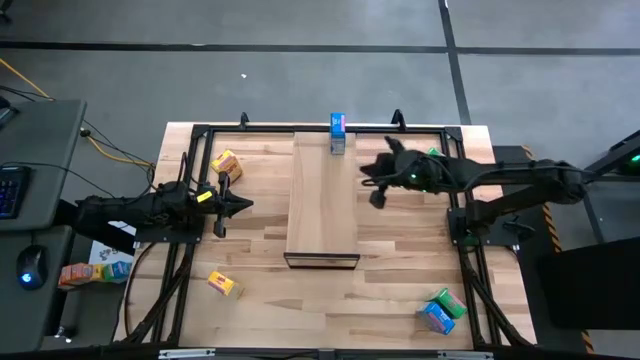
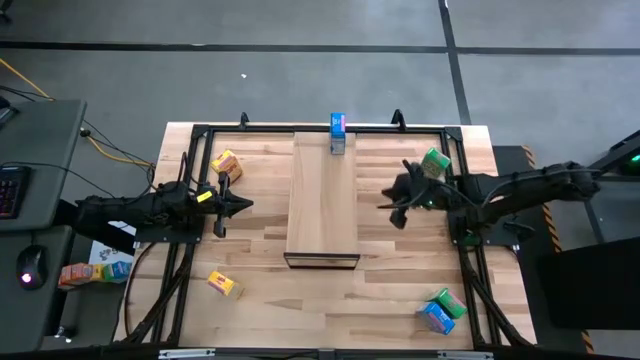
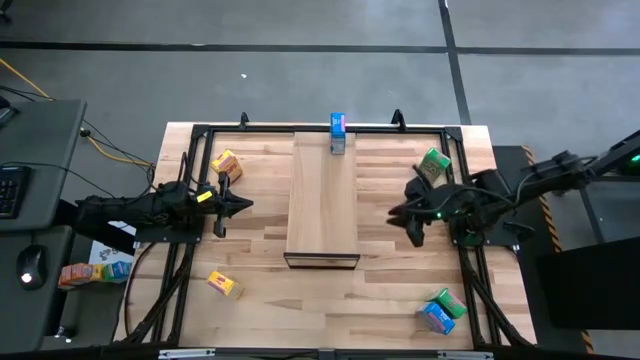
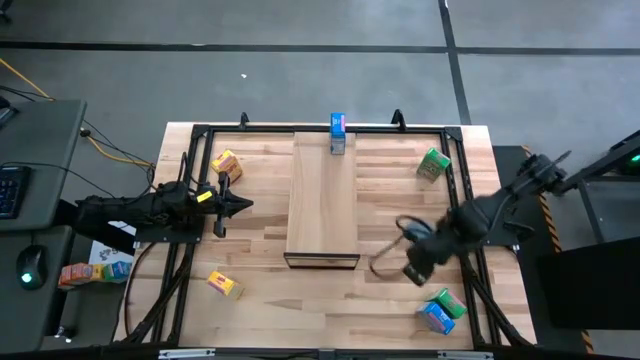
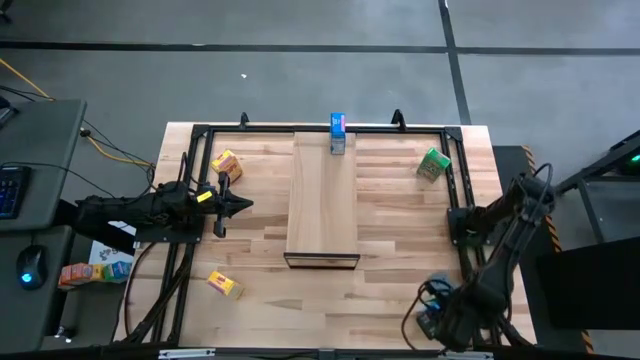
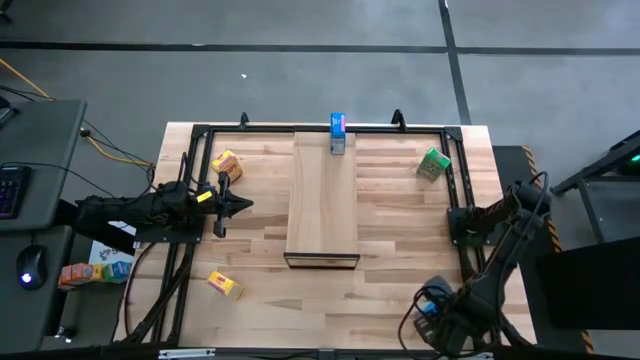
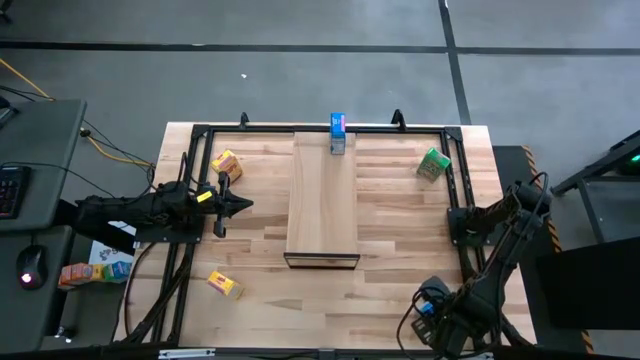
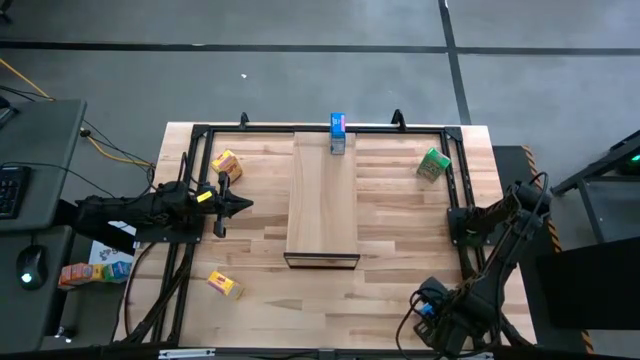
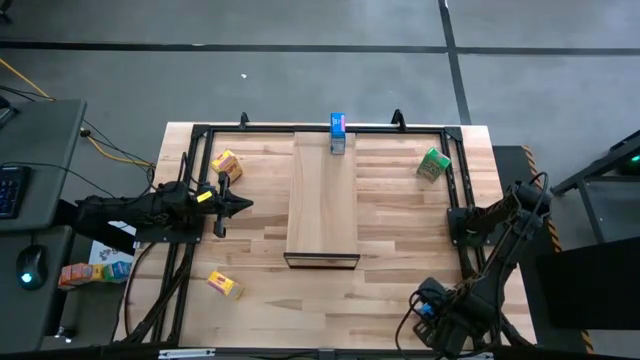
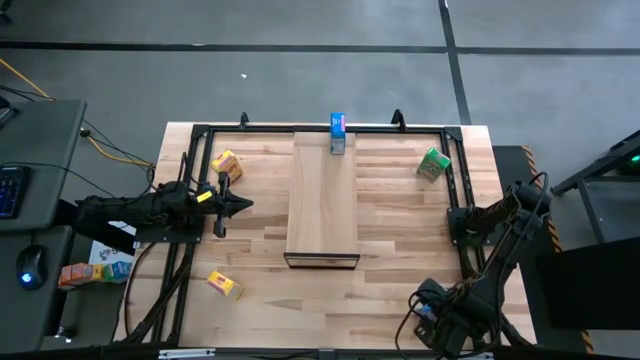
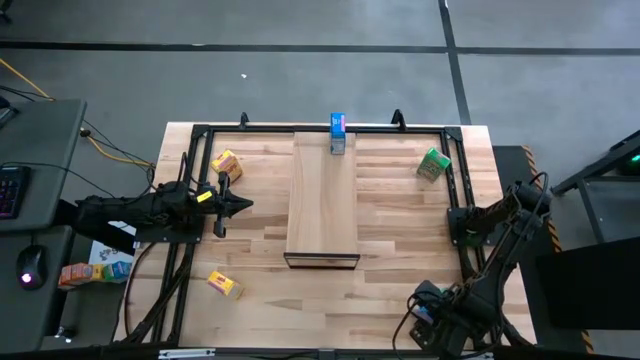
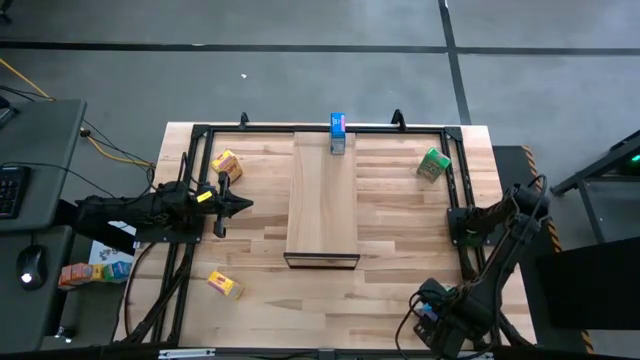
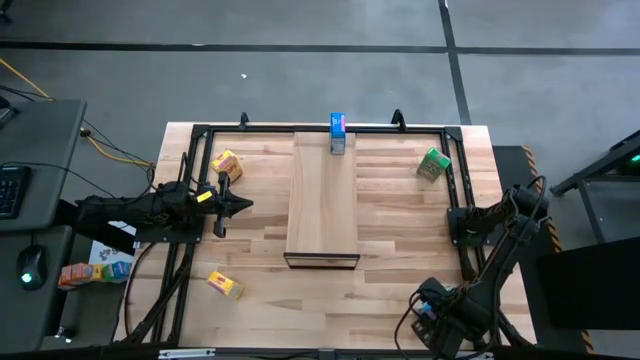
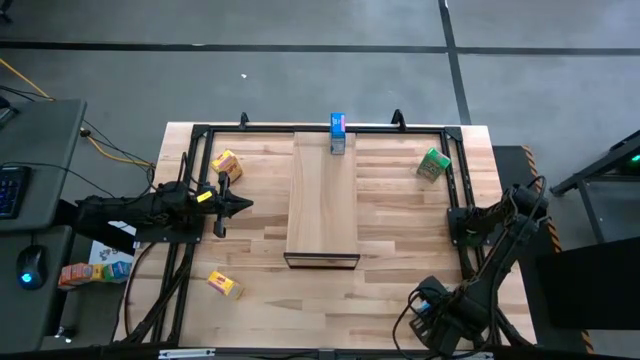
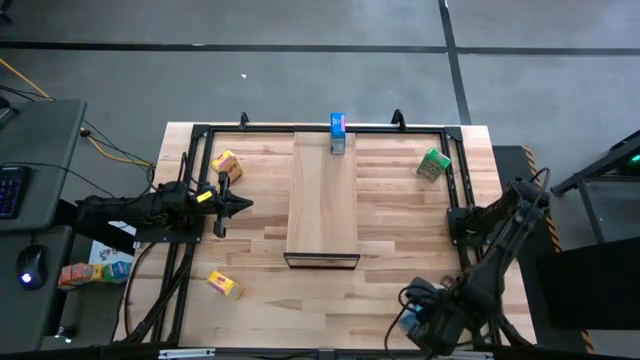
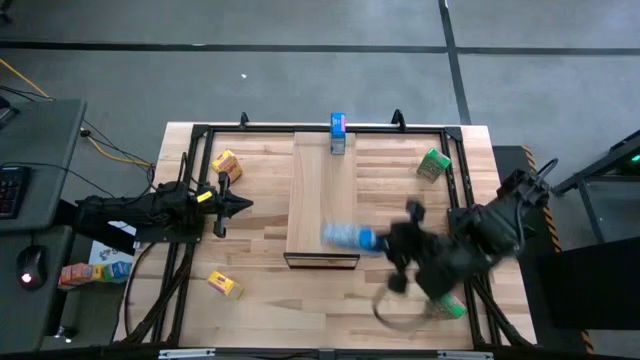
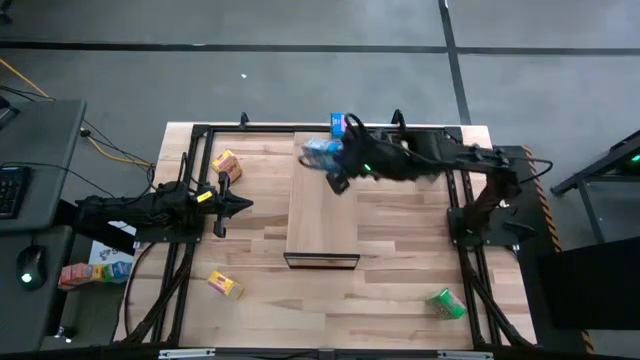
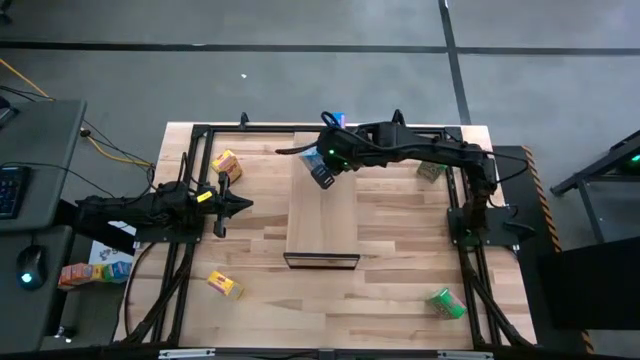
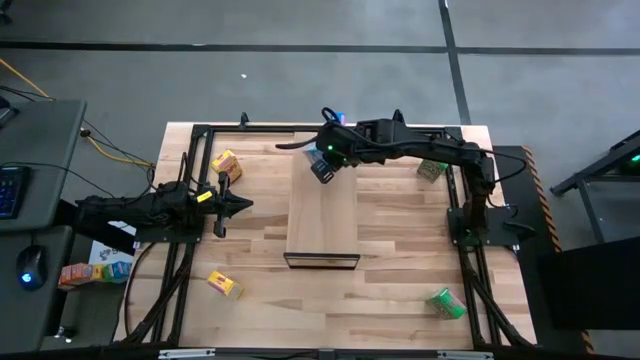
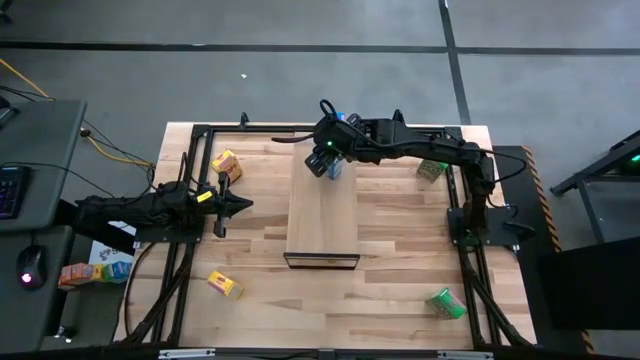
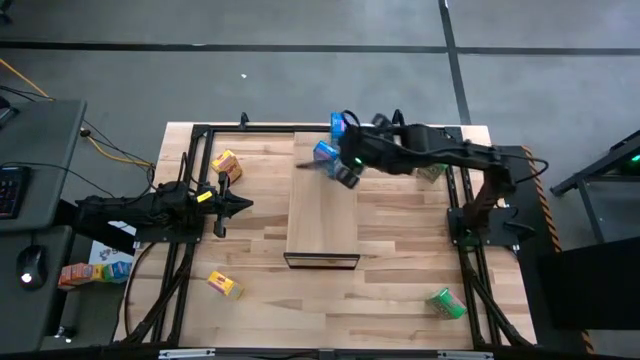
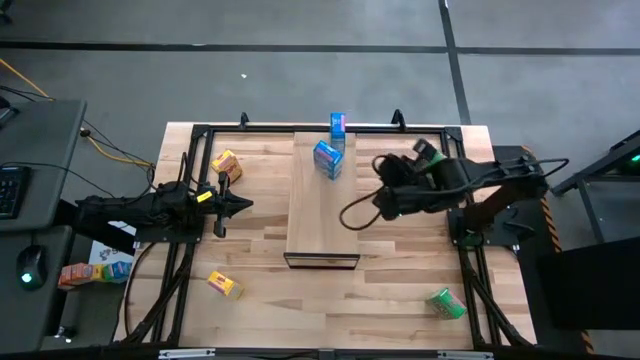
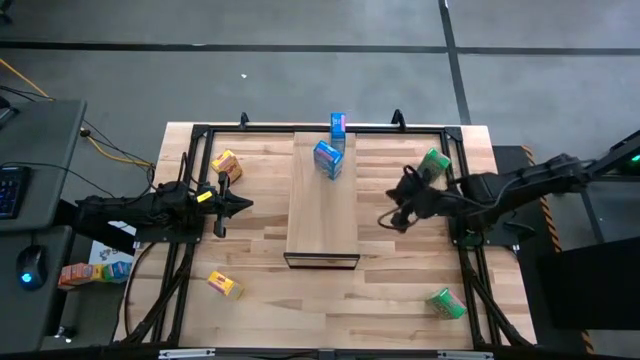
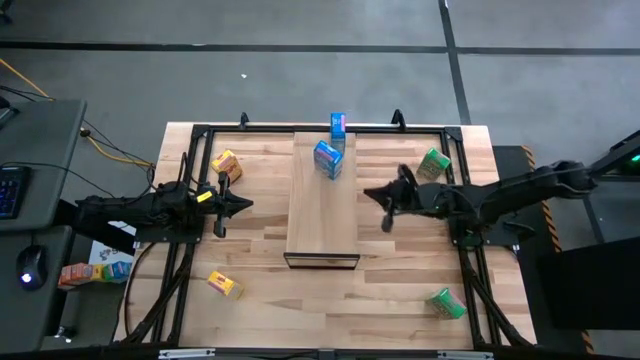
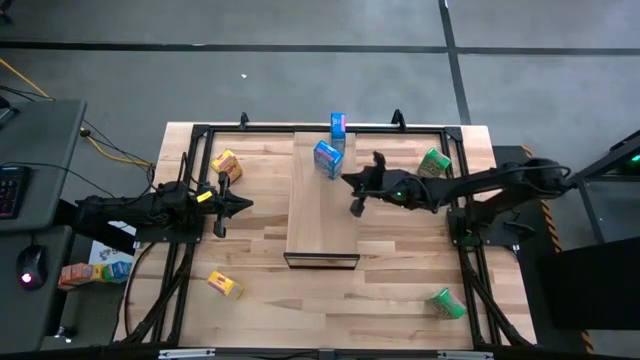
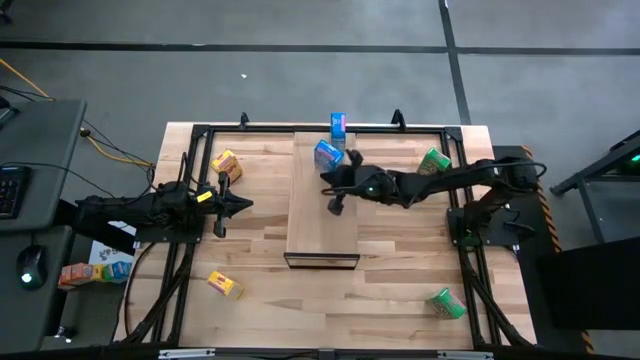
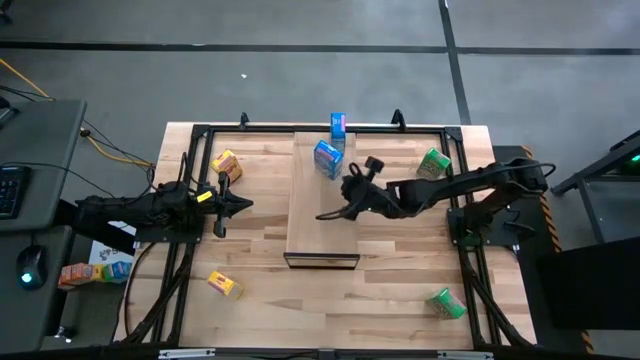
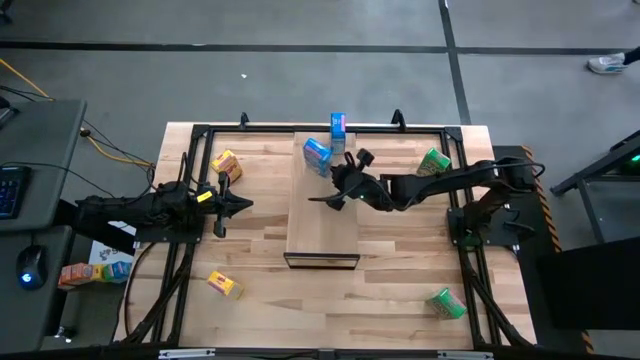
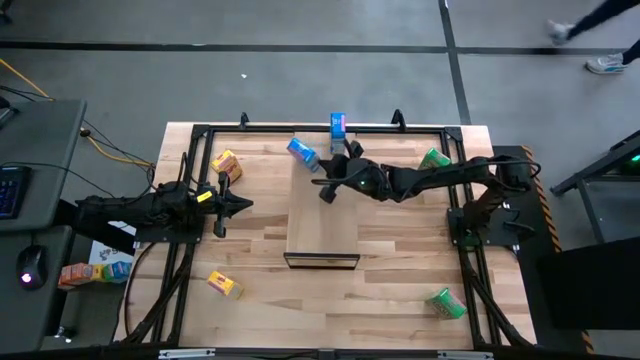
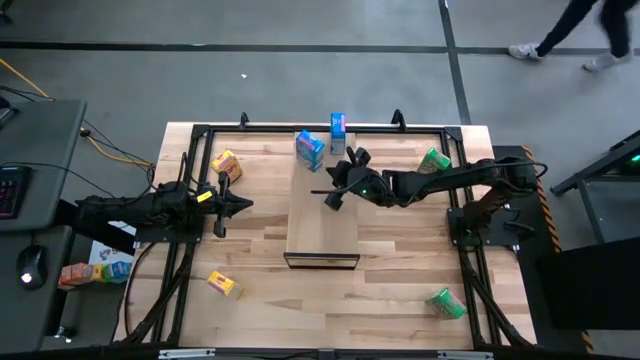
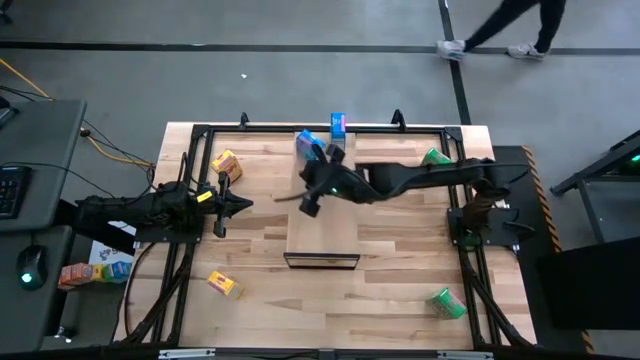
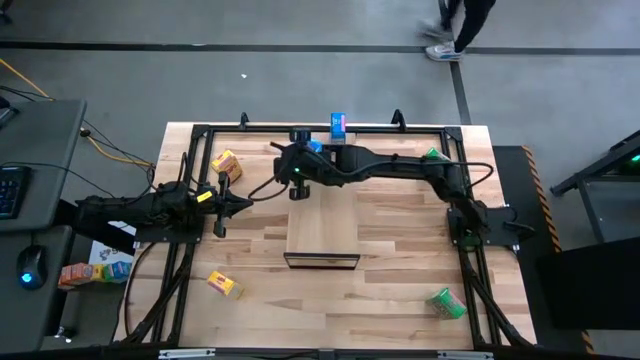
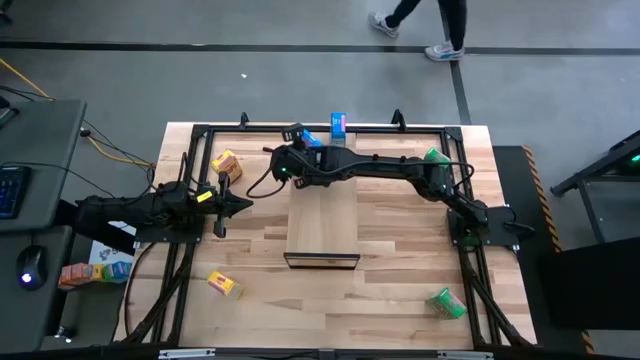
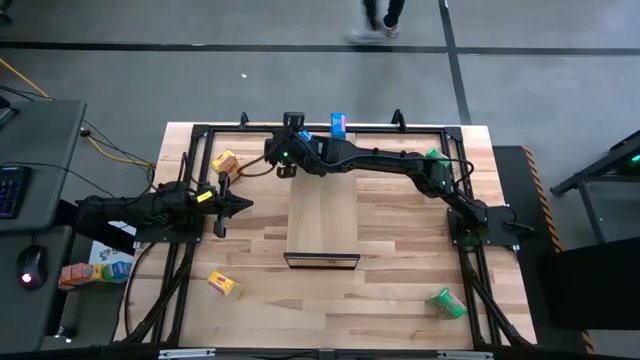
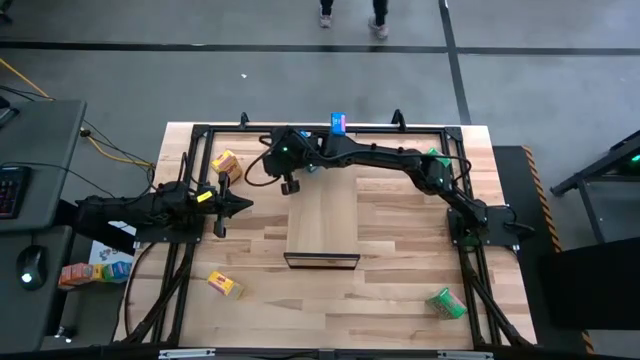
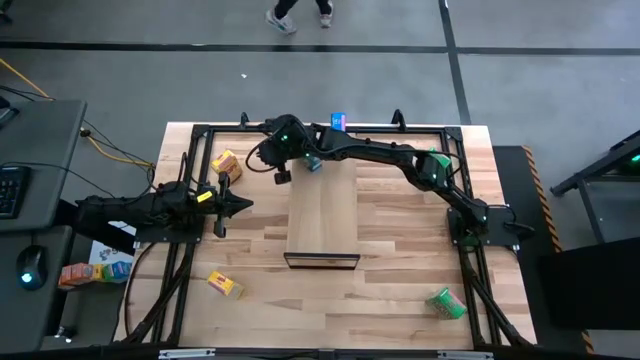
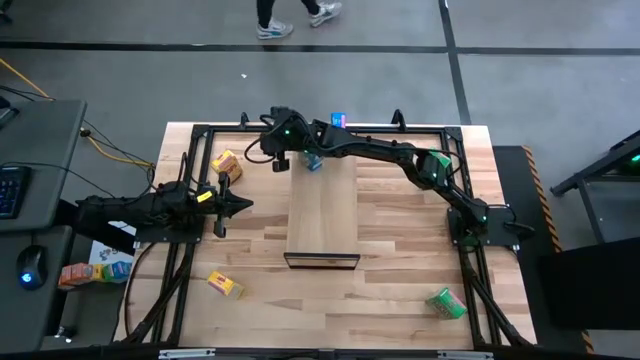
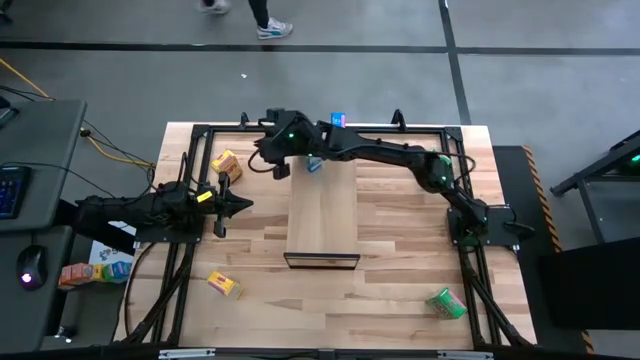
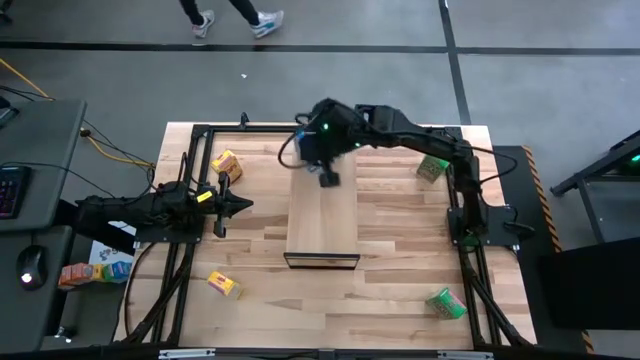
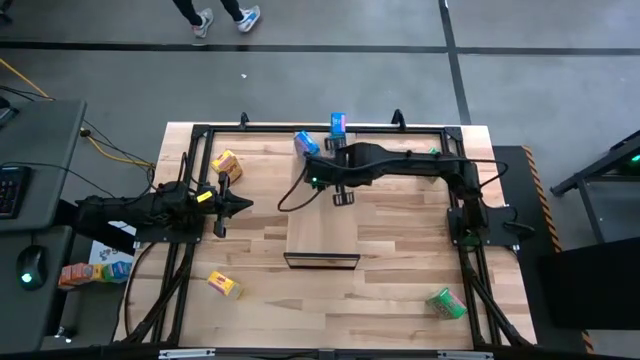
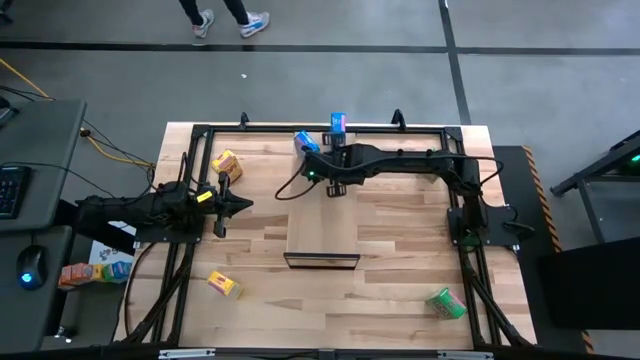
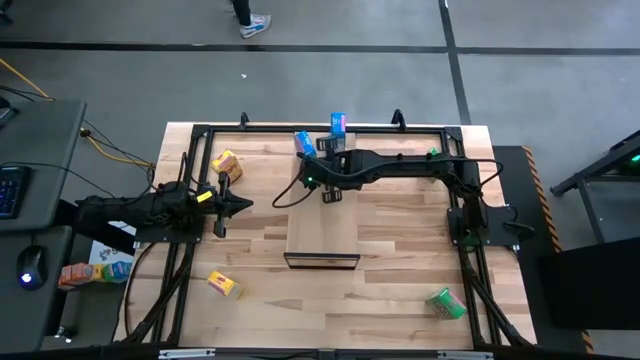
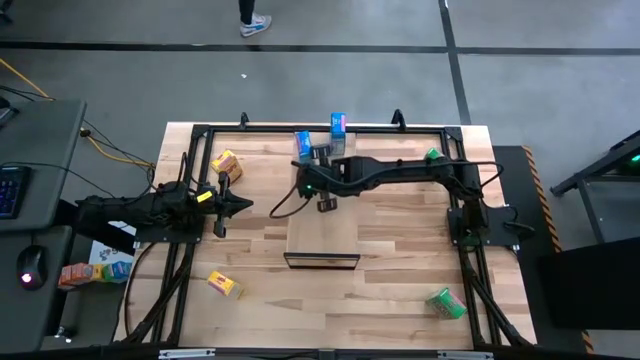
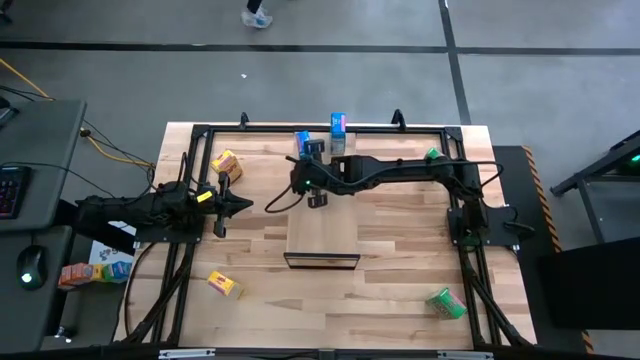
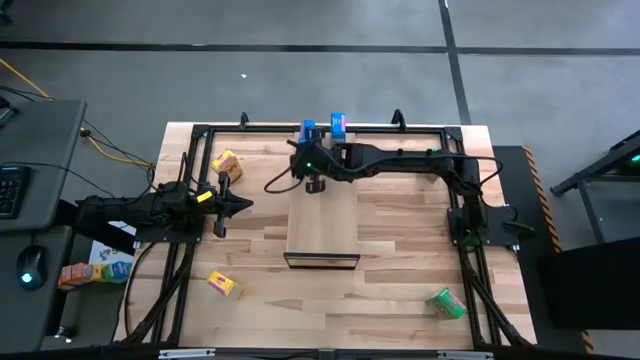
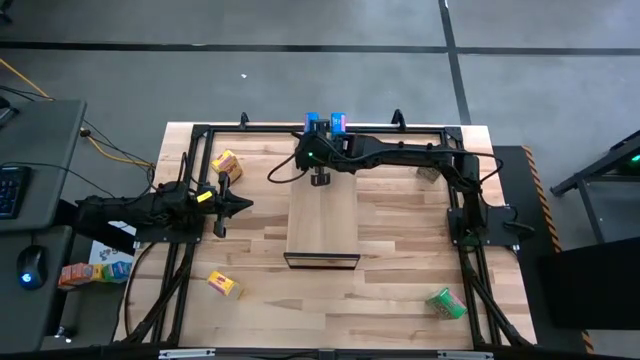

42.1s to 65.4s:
Task: Stack cereal on shelf
Put the blue cereal box on the shelf
